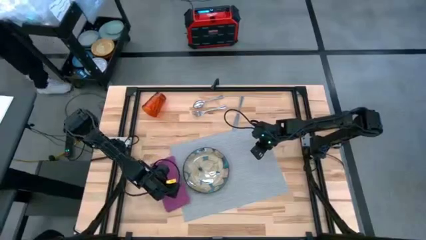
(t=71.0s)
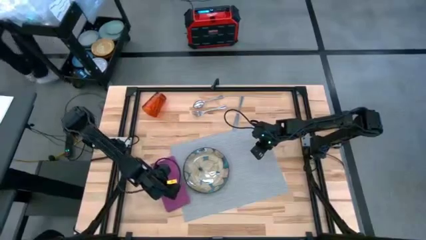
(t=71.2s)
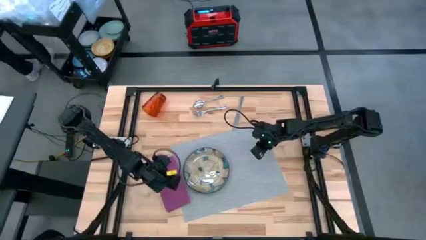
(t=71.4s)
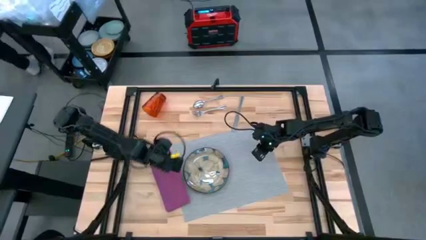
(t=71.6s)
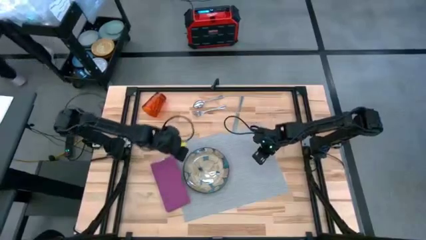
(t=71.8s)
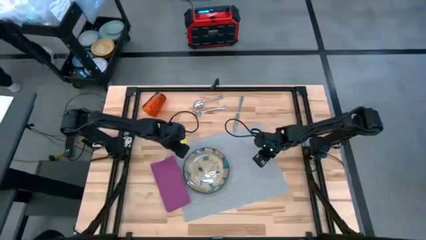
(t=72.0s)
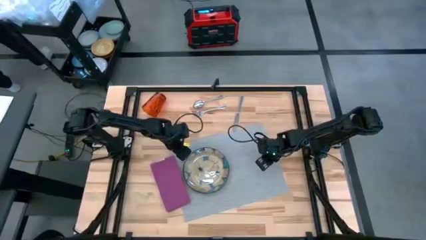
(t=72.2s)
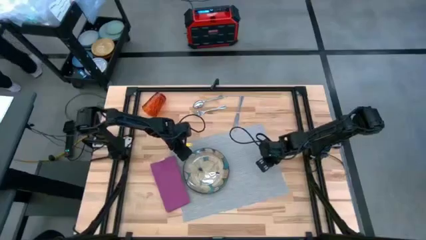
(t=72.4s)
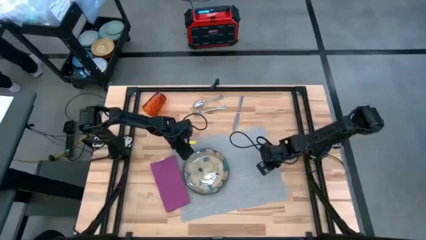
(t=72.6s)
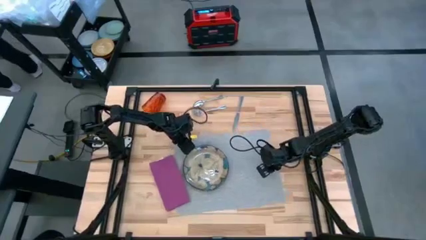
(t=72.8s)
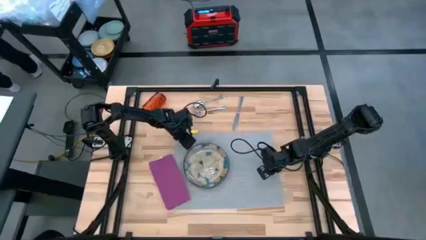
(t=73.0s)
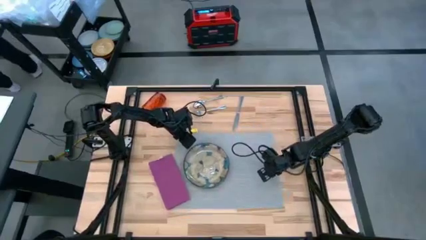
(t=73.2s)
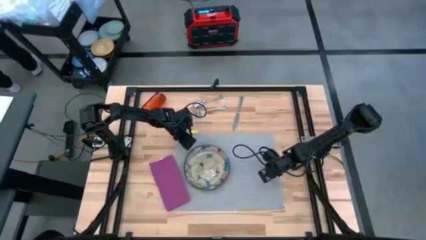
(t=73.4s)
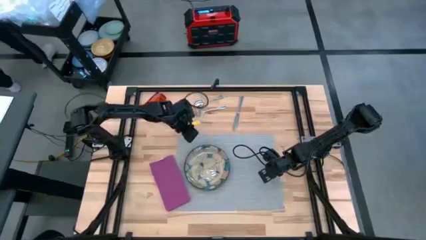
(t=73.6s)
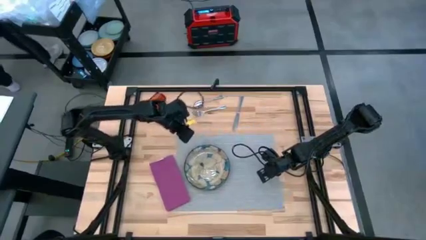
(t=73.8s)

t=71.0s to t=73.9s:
Task: Set table place
Adjust the gray table mat

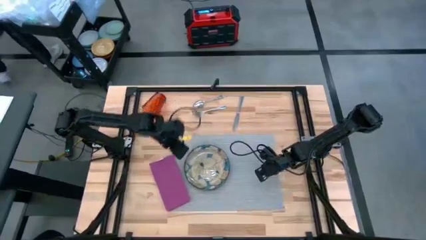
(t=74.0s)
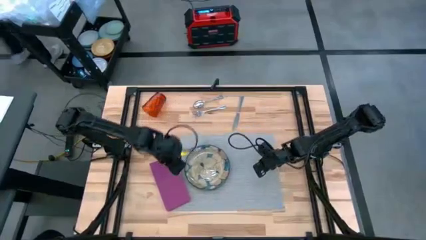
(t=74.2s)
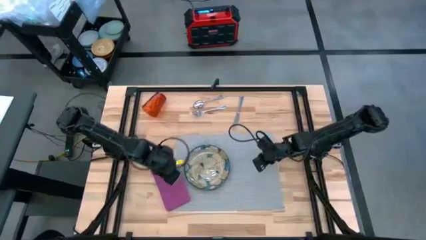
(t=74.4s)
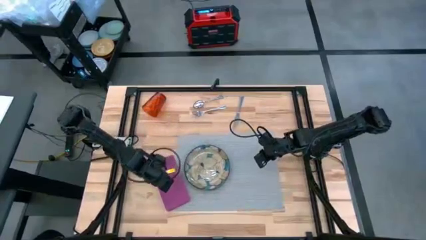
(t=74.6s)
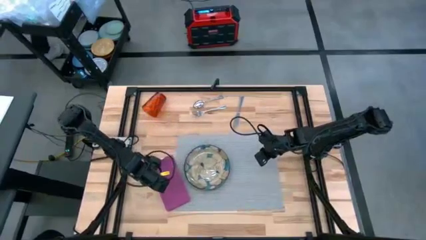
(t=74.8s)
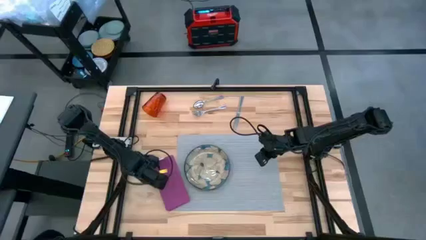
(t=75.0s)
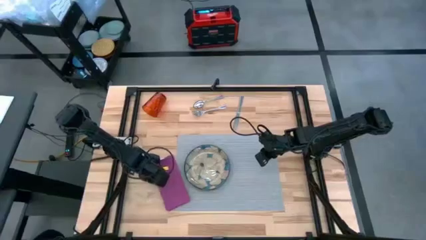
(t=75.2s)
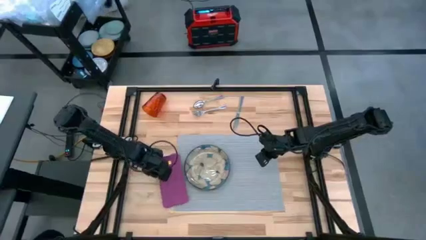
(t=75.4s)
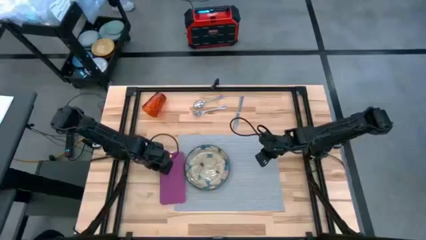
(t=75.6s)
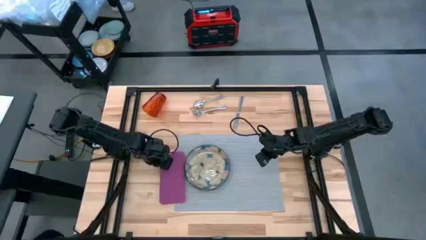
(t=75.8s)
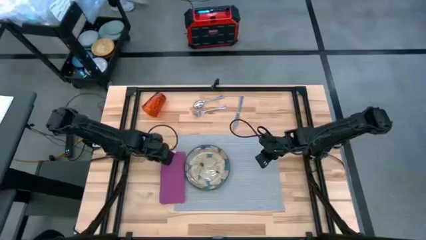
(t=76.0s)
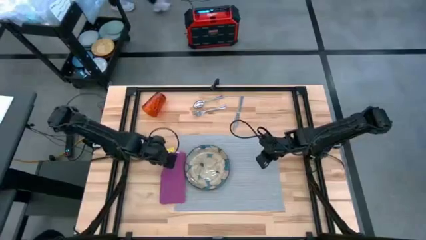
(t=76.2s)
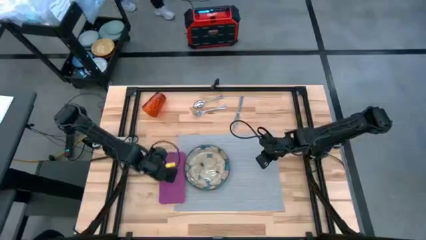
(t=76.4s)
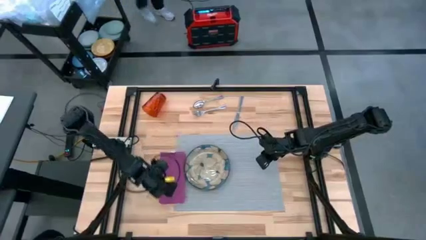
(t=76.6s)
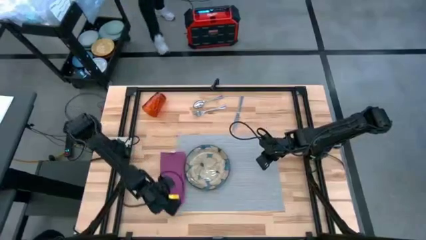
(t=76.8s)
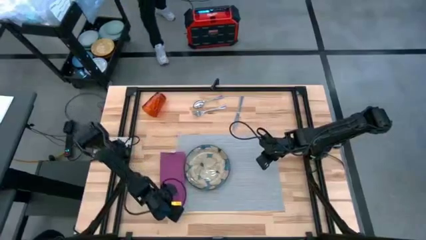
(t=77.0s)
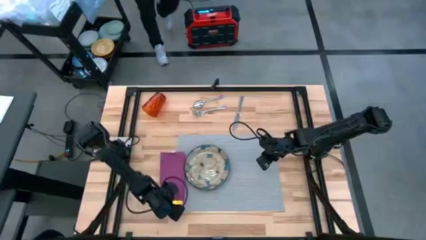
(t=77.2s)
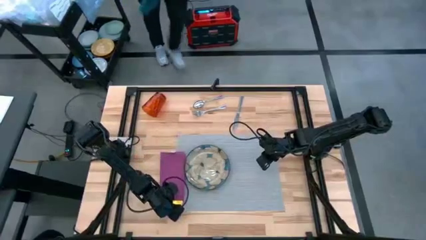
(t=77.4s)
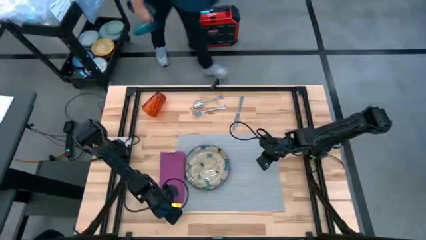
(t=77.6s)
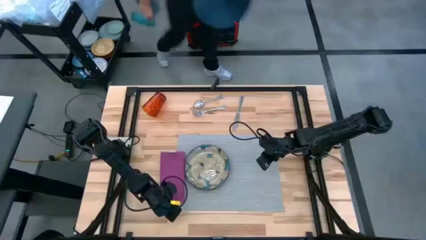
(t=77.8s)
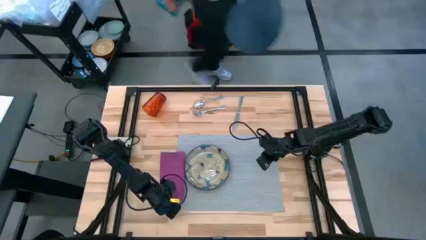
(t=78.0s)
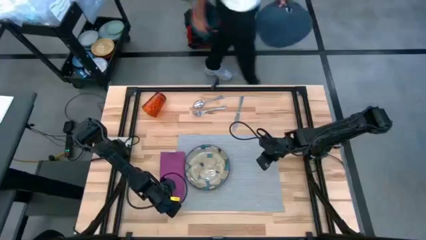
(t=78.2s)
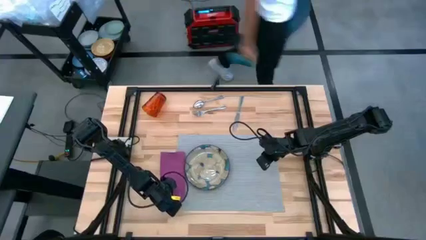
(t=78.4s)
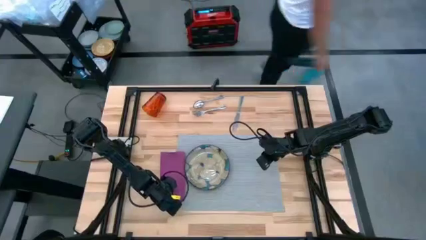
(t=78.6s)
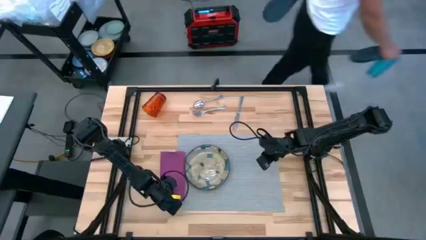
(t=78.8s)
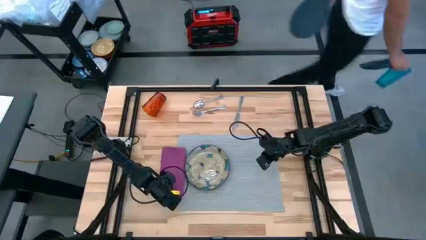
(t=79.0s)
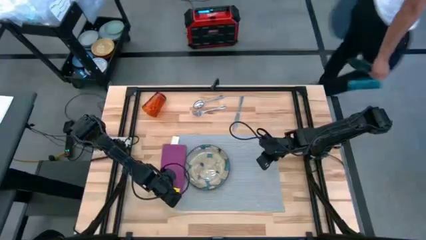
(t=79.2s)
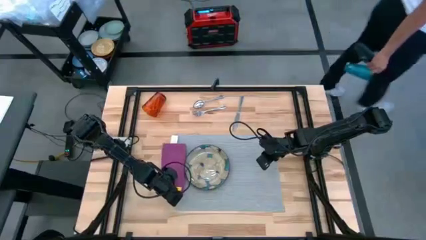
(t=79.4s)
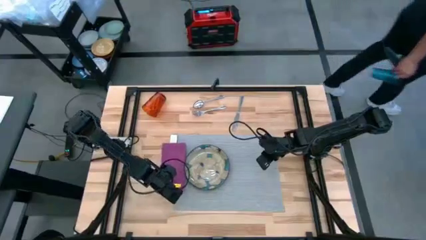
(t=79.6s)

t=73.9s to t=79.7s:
Adjust the pink table napkin beside the gray table mat

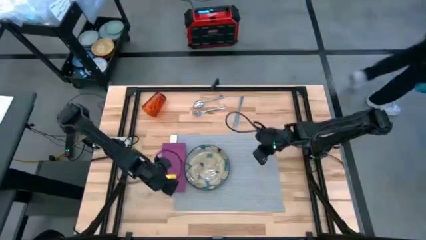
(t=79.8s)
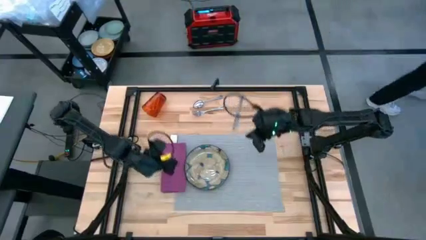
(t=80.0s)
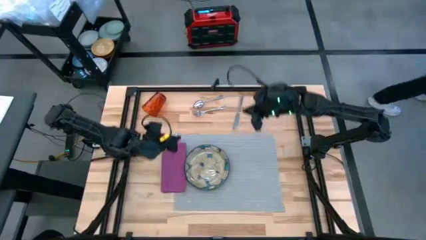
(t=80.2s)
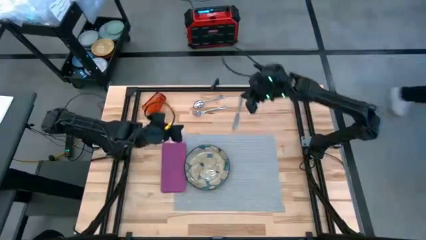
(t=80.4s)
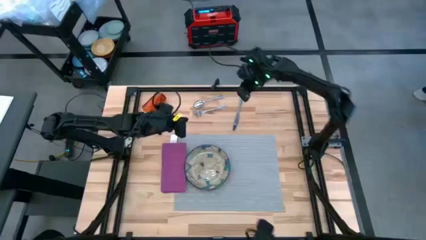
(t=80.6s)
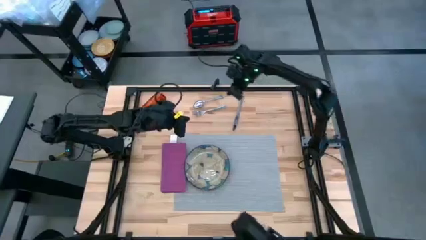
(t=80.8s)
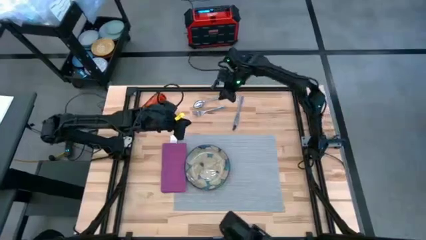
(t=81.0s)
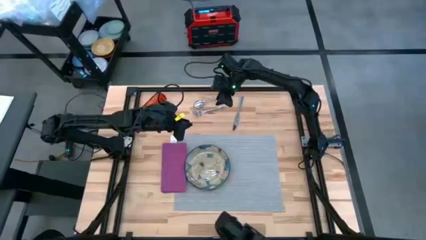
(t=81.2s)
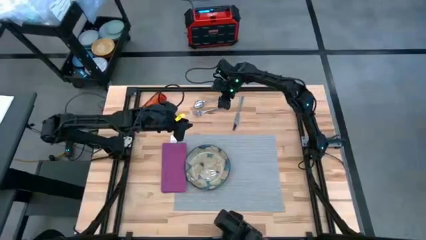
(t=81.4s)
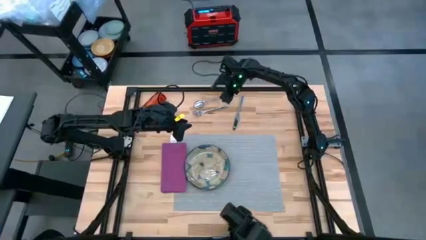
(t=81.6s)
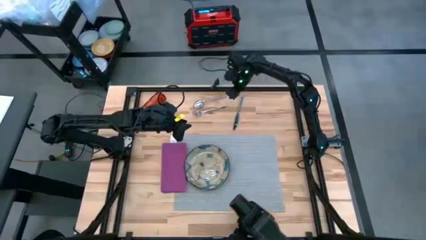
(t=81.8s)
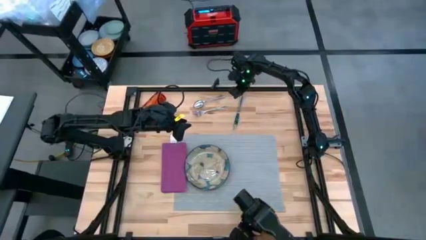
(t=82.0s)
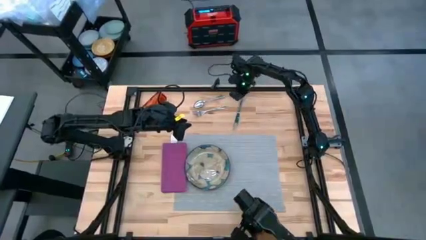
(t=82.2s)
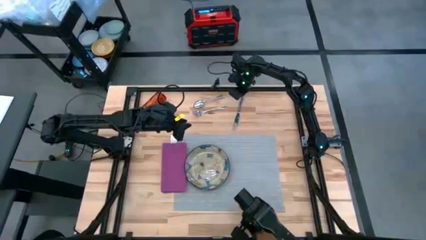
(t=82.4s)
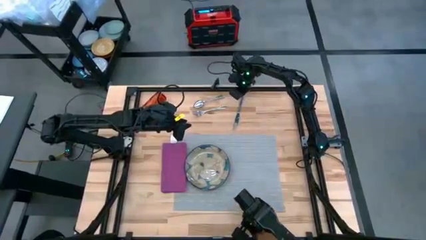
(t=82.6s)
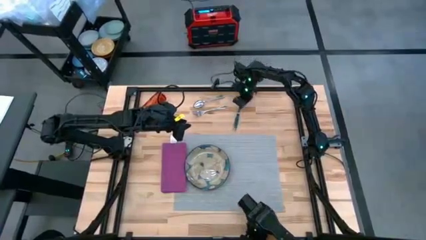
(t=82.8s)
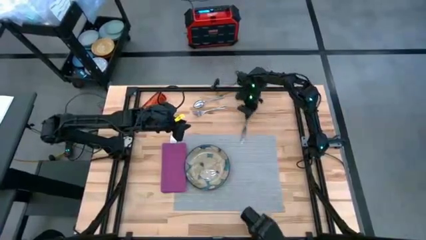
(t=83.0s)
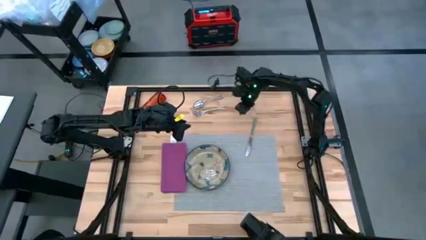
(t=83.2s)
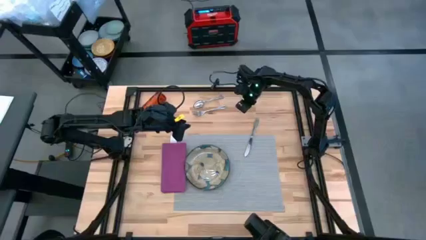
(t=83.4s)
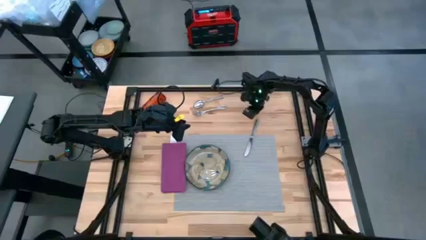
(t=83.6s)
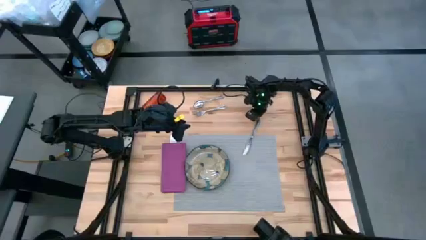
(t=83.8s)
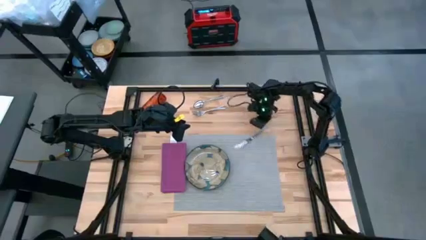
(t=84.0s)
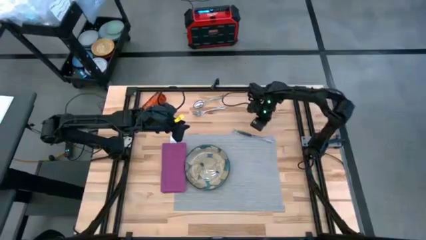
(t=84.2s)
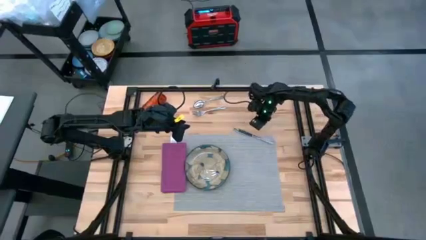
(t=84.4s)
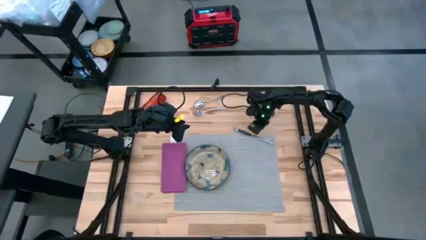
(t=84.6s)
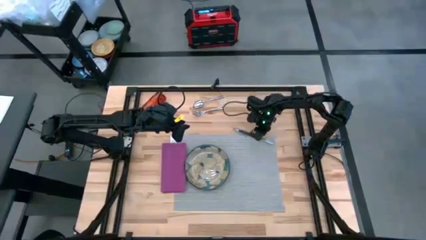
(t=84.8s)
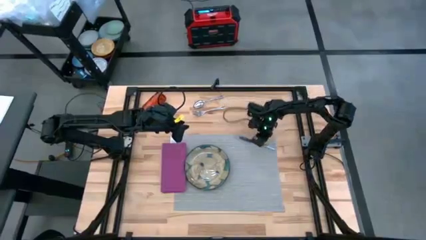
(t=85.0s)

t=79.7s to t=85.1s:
Move the silver table knife to the right side of the patterned plate on the gray table mat

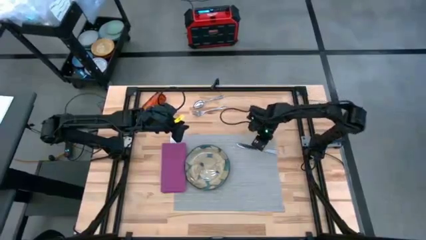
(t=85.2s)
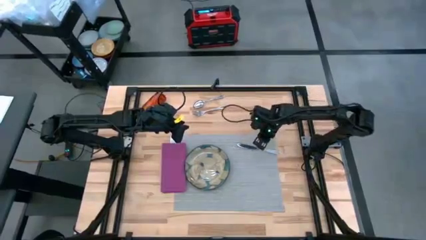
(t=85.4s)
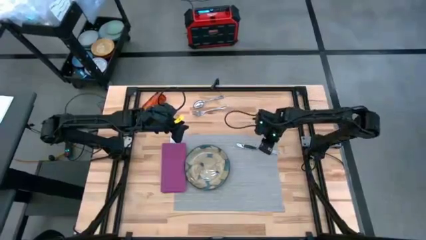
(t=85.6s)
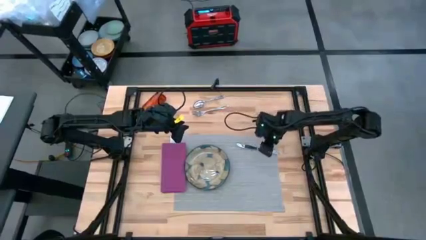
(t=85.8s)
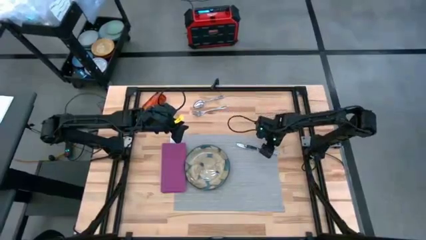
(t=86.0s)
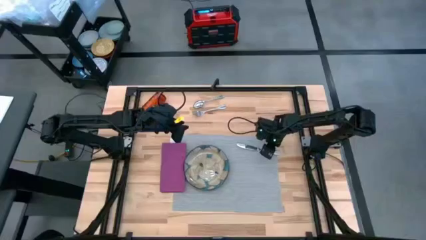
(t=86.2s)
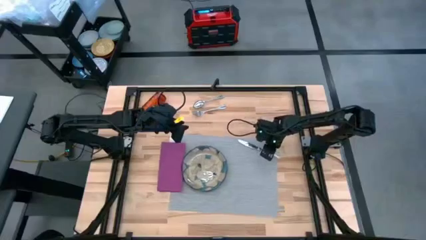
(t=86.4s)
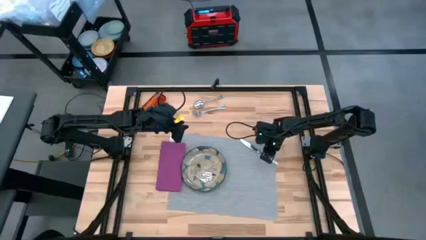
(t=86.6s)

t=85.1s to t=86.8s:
Move the silver table knife to the right side of the patterned plate on the gray table mat

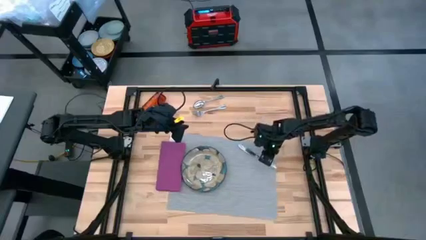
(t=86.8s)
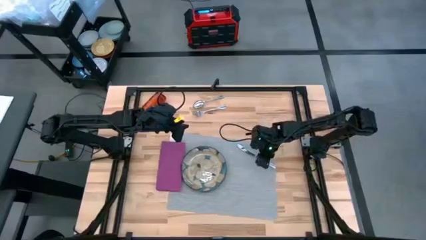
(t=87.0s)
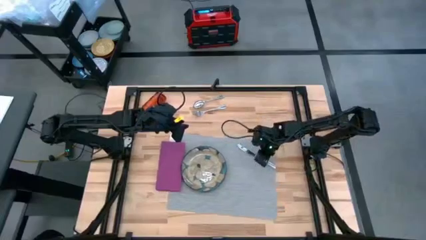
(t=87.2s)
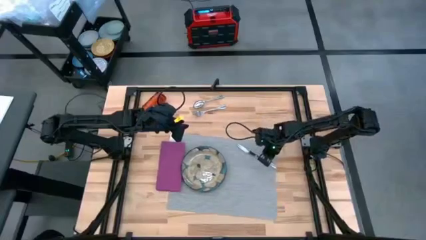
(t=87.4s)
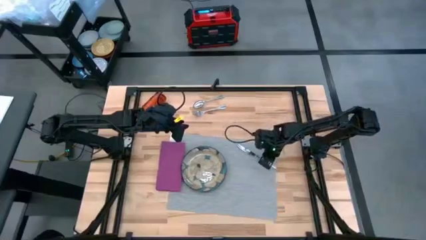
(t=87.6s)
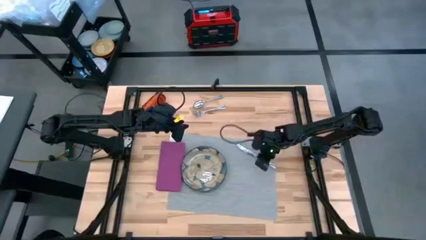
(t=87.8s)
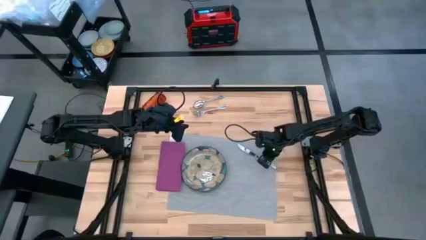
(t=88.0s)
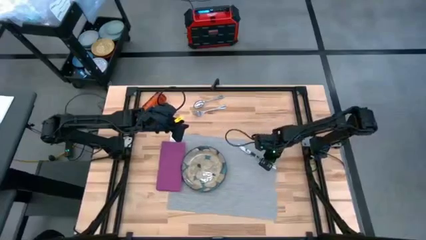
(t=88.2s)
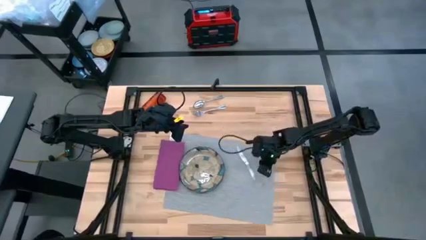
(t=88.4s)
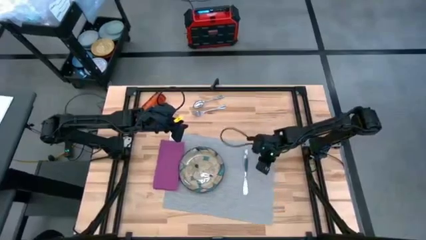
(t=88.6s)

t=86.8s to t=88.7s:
Move the silver table knife to the right side of the patterned plate on the gray table mat
